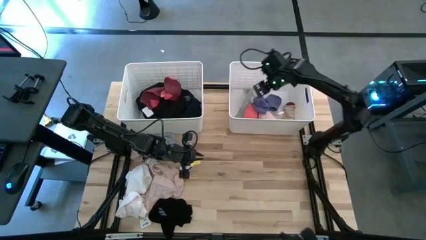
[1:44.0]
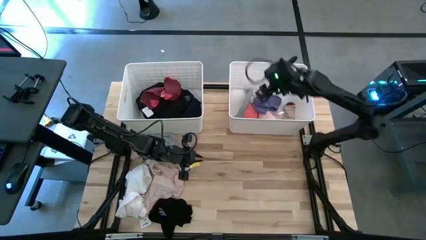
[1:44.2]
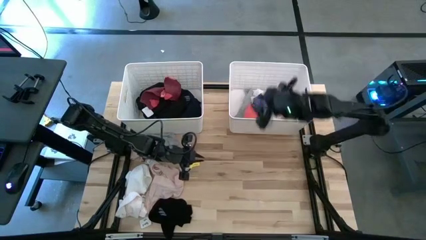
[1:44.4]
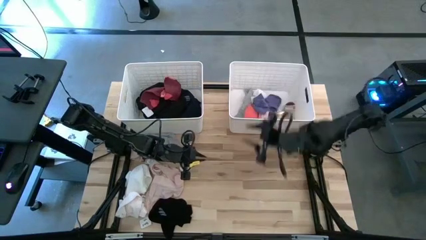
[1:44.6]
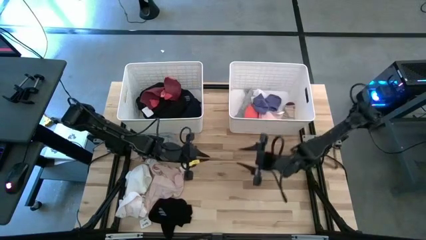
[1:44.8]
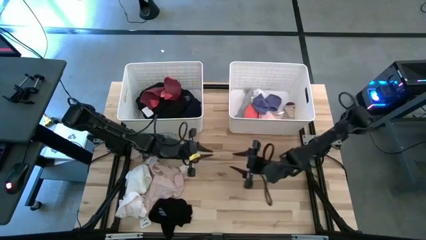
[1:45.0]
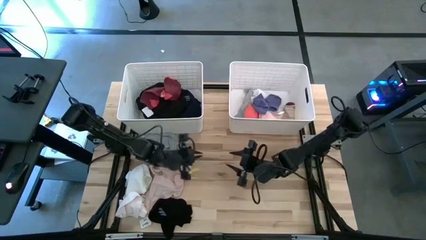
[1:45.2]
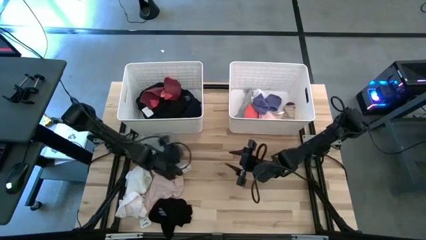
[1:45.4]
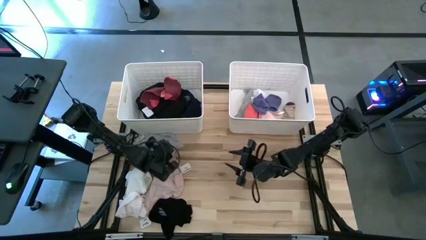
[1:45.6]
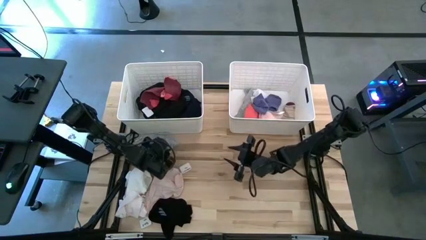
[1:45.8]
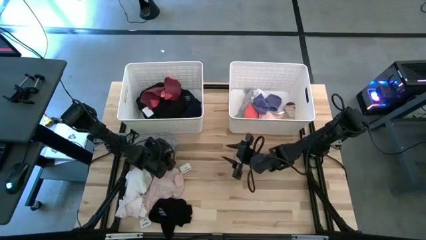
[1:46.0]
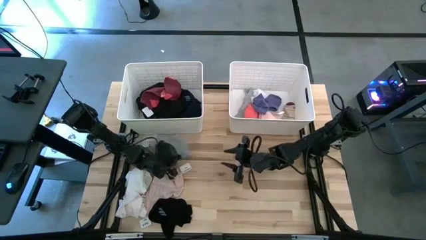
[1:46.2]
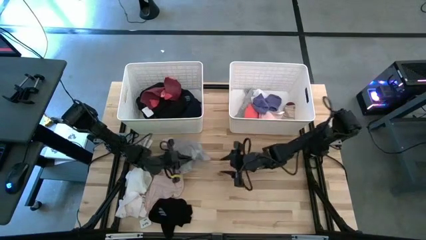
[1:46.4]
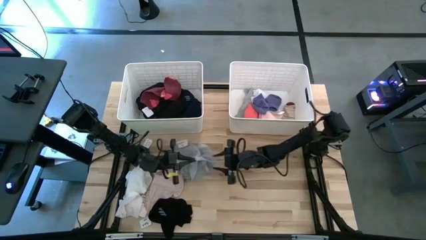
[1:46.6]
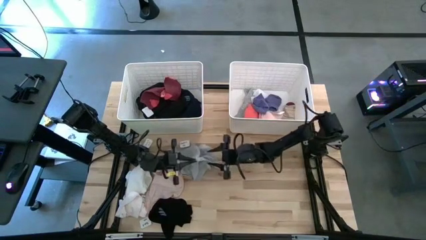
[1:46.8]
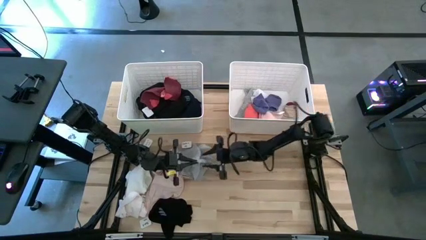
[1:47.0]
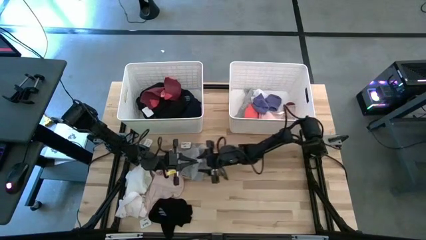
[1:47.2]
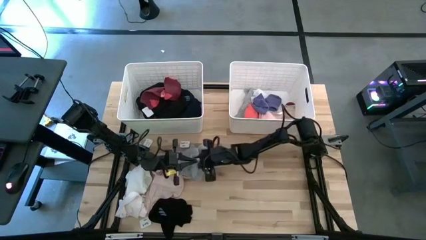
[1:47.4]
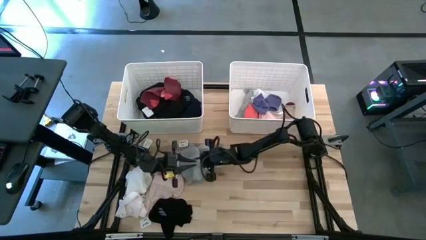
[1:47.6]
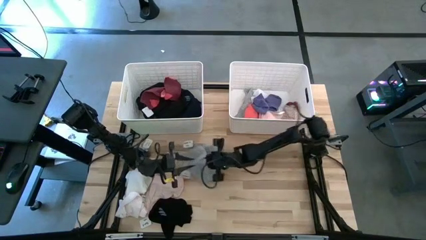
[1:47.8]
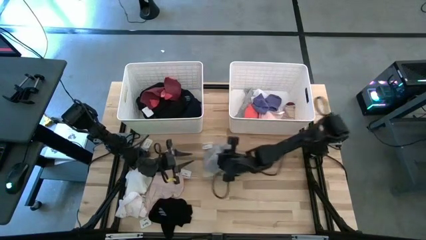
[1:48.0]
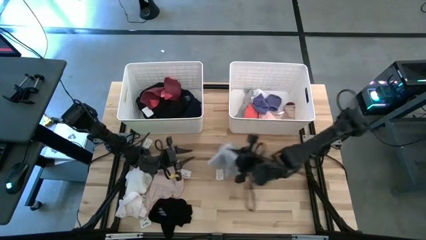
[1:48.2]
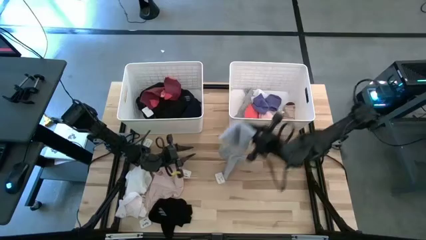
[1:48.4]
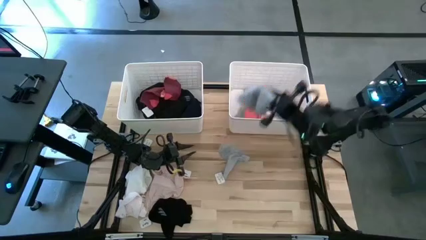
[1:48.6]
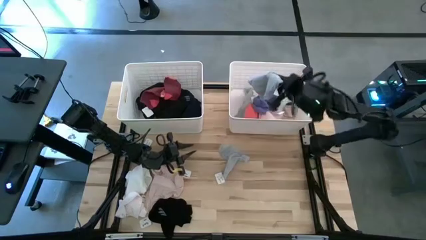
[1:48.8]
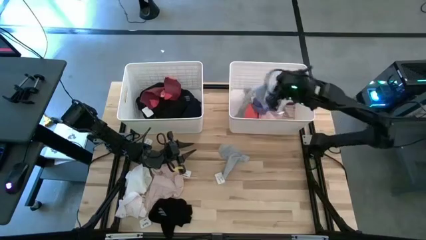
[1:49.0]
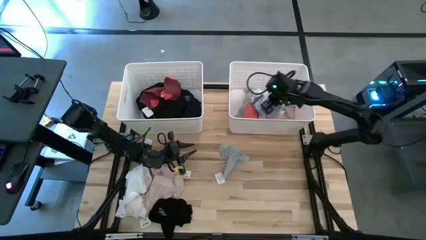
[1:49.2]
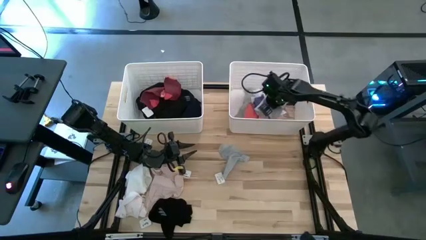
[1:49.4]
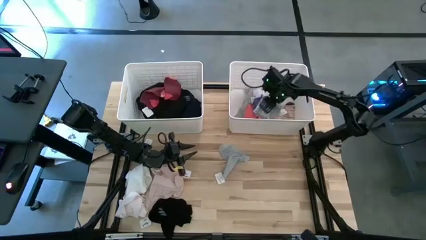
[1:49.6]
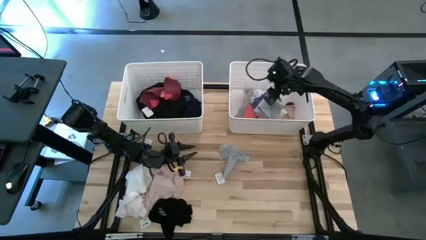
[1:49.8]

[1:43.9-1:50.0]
Task: Sort clothes
Put the gray underwear into the right white laundry bin

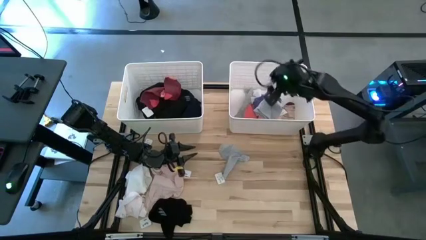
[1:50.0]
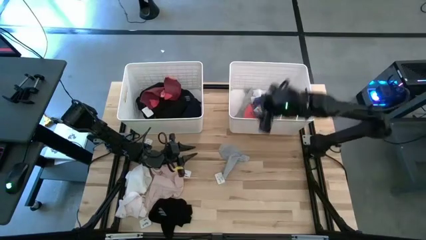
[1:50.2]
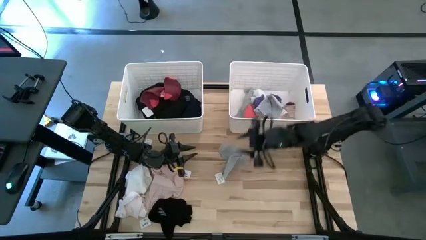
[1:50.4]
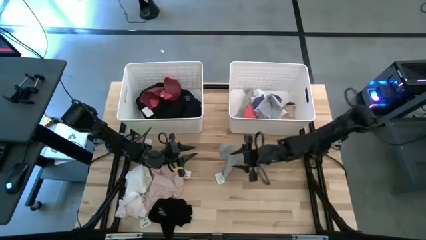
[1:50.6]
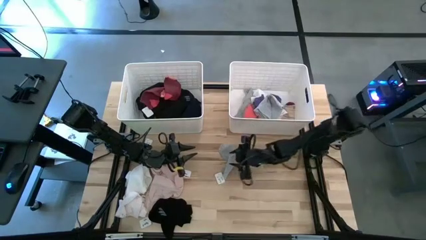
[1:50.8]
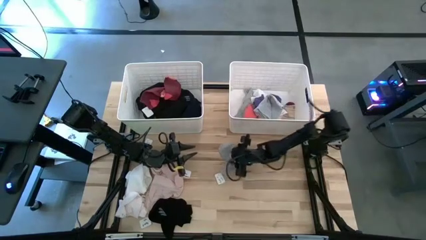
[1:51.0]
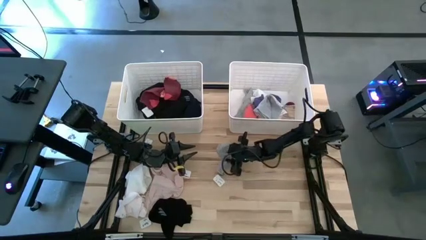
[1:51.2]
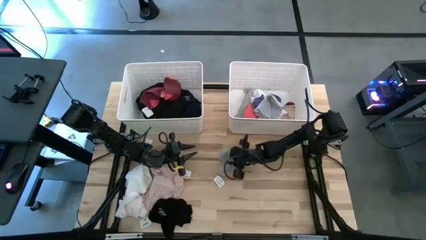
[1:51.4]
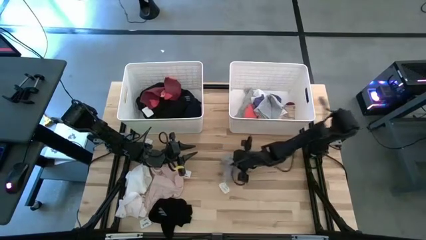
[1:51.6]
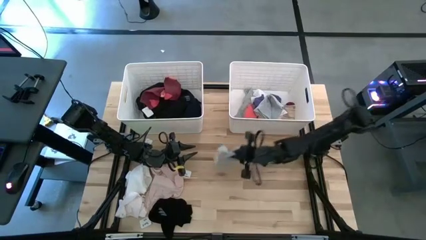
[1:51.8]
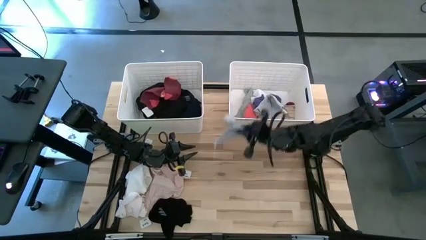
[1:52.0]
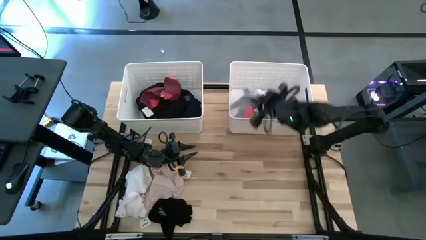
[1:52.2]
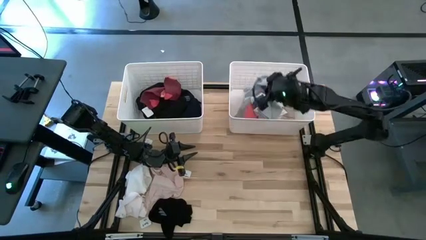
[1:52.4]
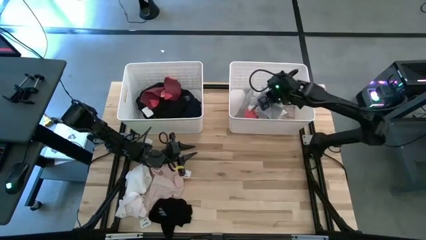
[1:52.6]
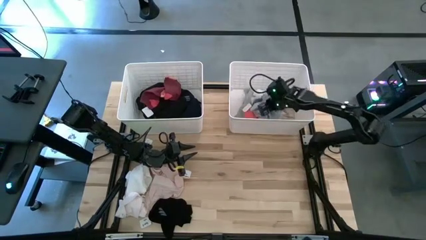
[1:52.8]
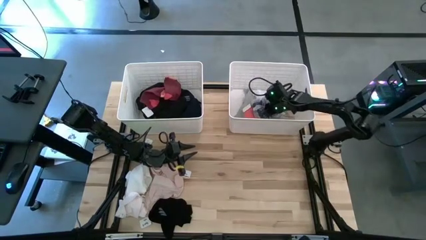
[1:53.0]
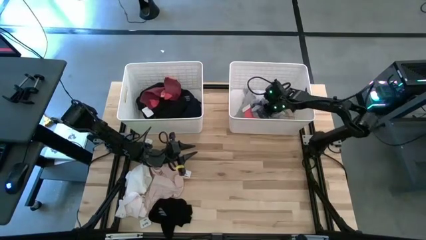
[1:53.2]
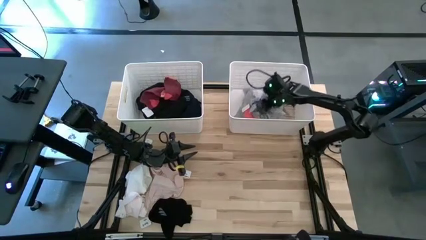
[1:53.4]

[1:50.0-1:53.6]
Put the gray sock into the right white laundry bin

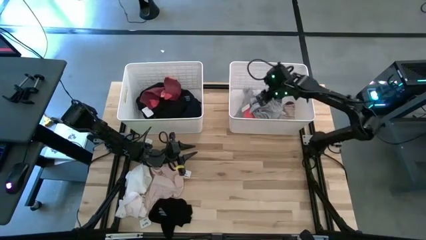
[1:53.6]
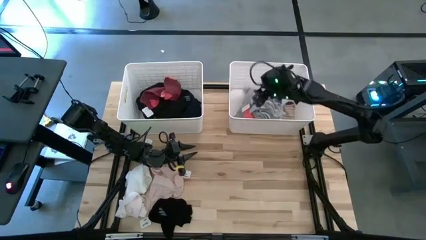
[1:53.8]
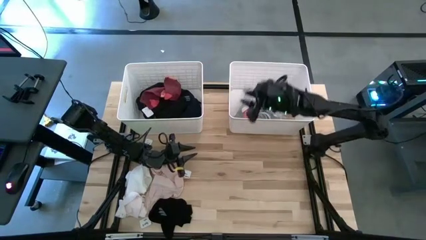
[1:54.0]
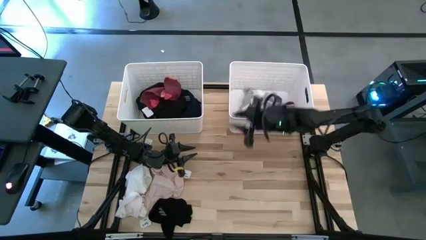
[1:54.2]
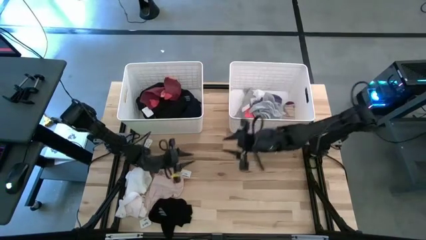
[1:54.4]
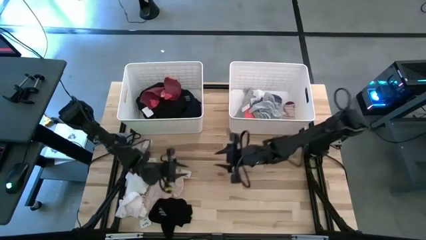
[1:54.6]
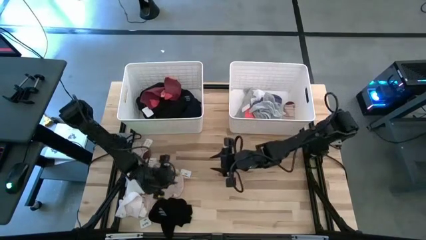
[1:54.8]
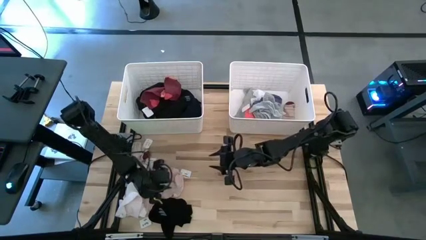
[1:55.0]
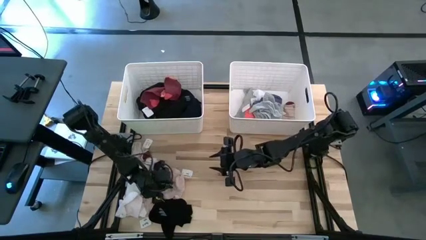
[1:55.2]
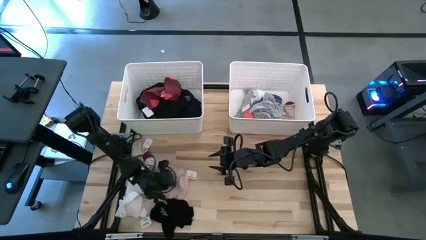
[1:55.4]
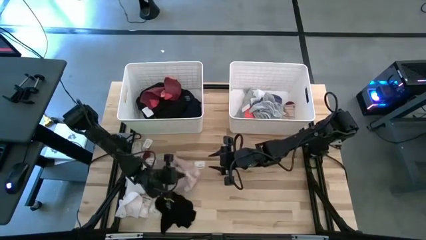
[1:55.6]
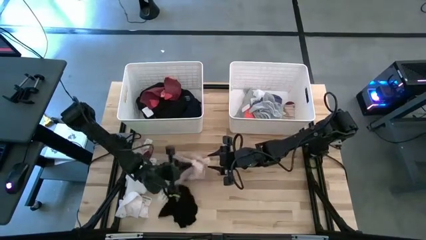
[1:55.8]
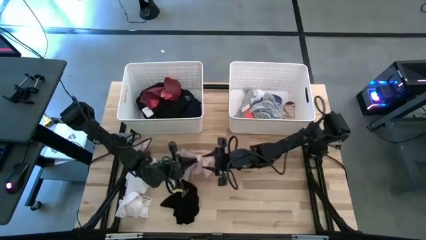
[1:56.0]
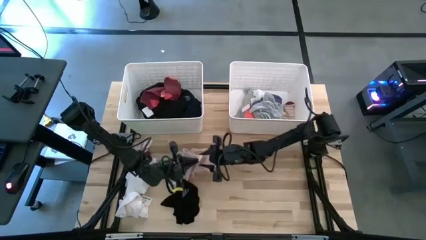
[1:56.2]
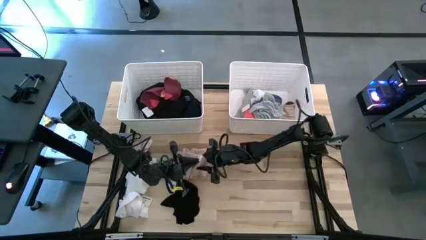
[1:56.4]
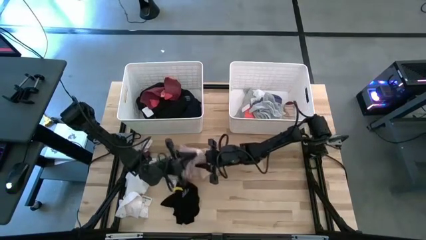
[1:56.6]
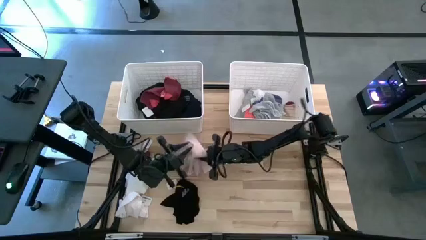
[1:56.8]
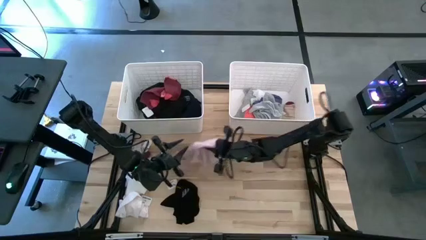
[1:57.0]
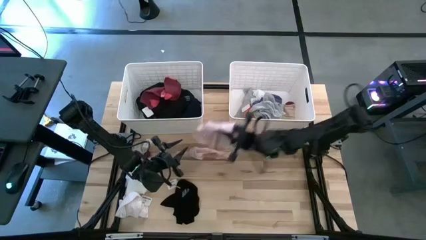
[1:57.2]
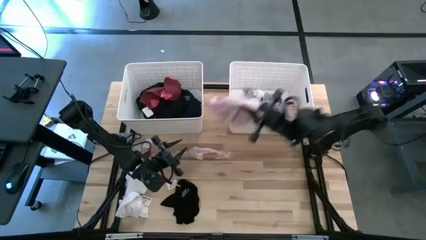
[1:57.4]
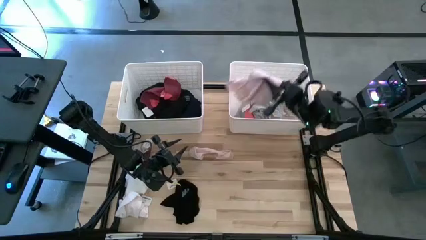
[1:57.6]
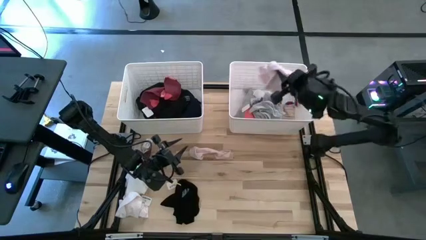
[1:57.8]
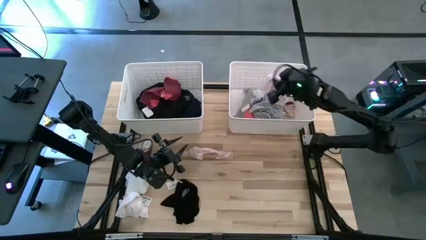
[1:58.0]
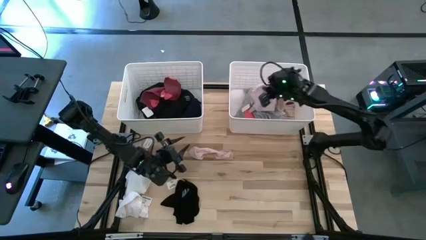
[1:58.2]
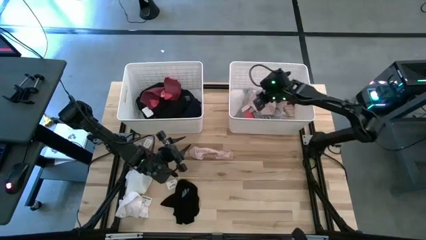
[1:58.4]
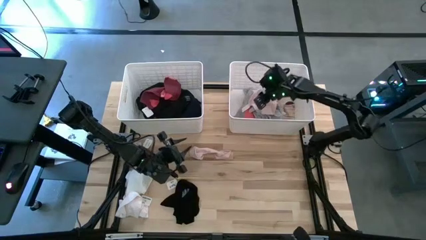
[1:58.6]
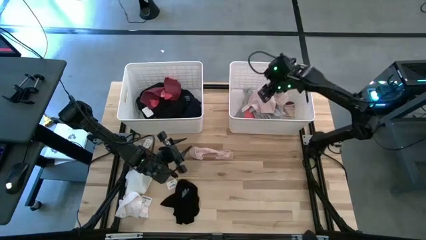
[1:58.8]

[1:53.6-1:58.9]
Put the pink underwear into the right white laundry bin

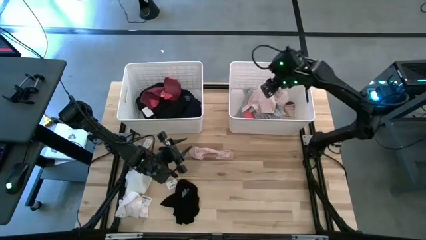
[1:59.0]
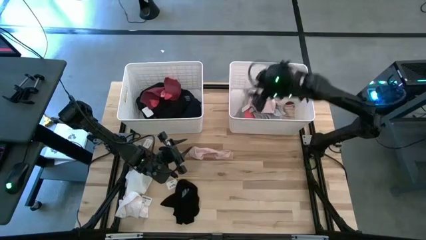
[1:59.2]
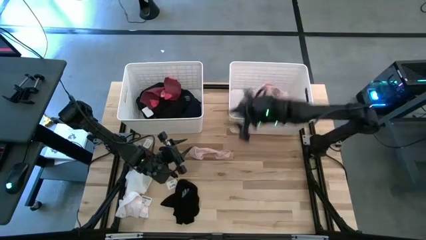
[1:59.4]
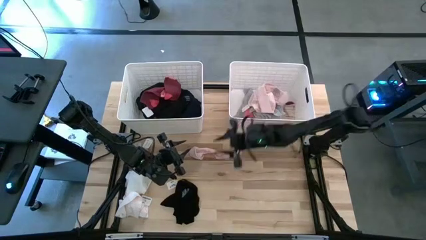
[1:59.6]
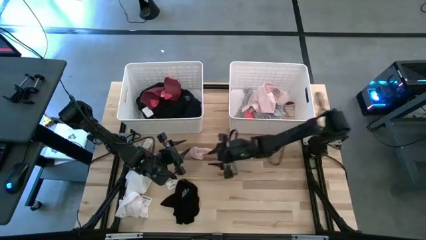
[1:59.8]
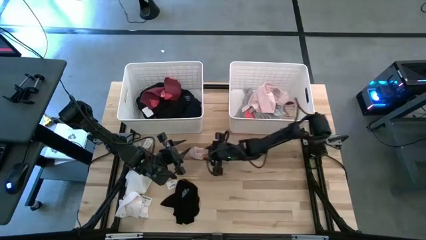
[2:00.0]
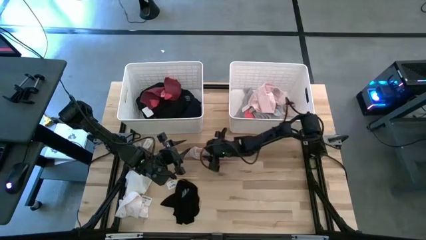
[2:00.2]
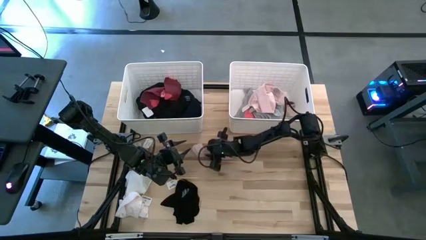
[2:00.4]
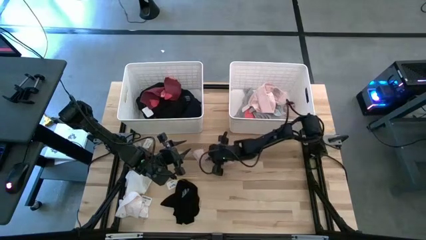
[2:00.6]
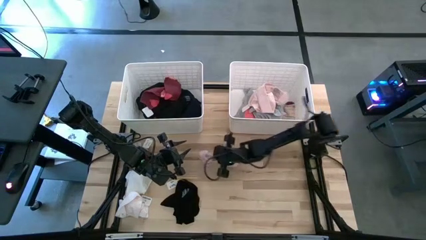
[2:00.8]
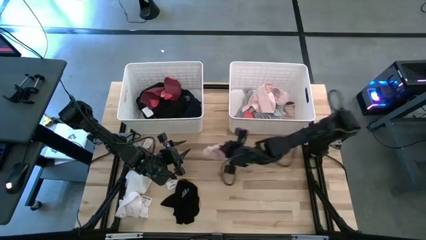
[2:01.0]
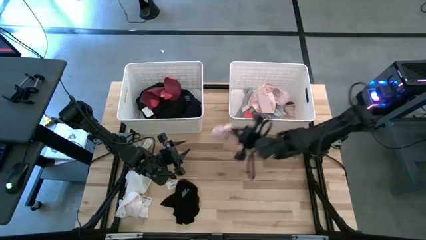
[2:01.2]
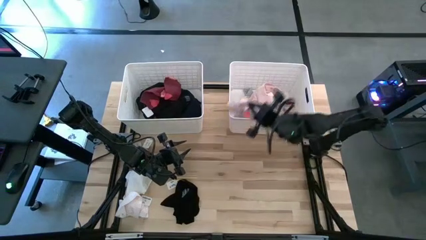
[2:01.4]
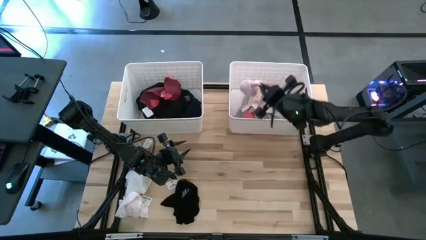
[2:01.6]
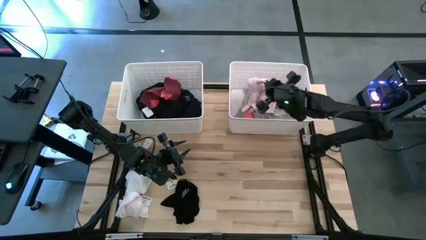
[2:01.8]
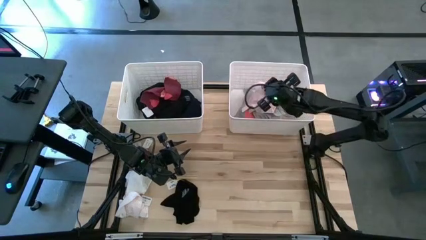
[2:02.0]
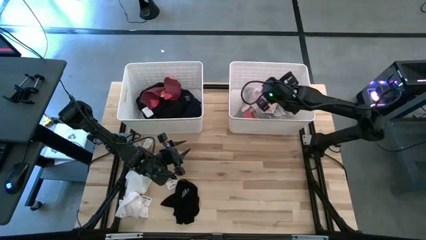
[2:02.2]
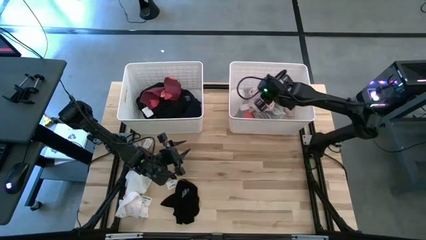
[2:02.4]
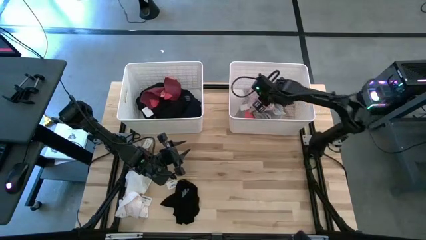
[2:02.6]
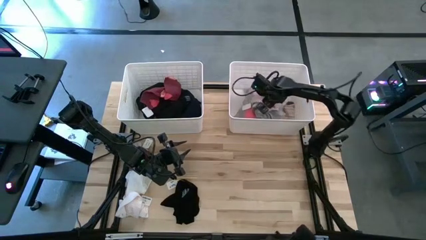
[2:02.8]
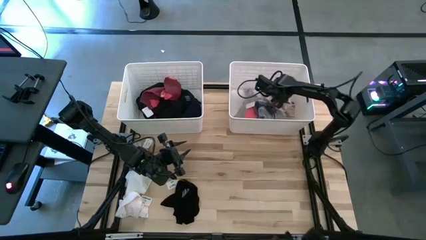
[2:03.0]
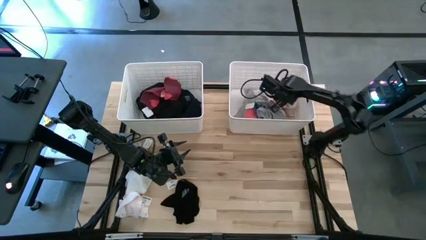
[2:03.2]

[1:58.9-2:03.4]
Put the light pink sock into the right white laundry bin
